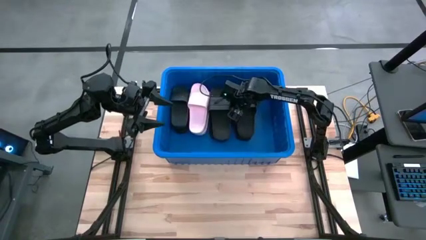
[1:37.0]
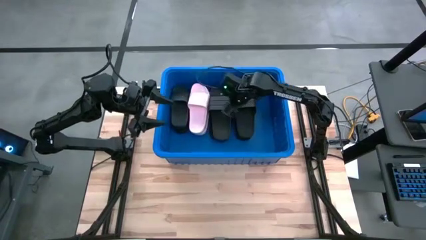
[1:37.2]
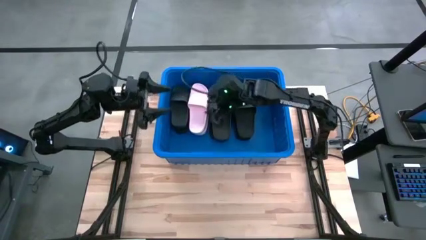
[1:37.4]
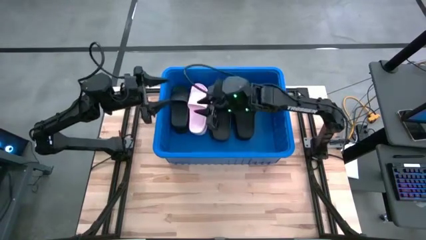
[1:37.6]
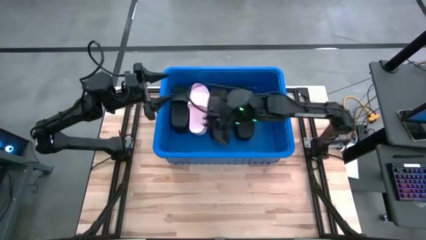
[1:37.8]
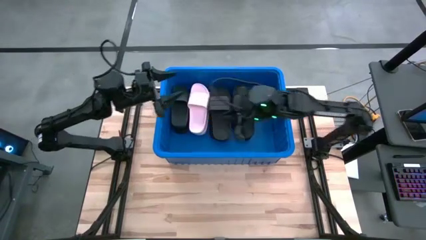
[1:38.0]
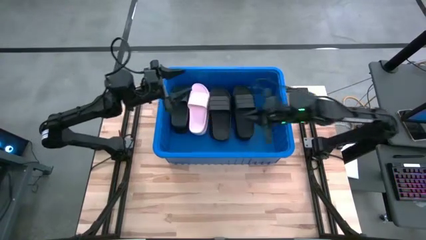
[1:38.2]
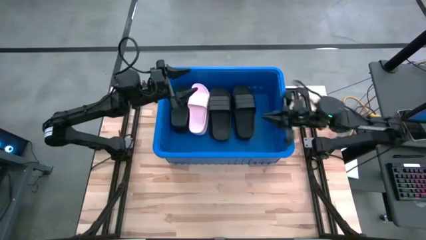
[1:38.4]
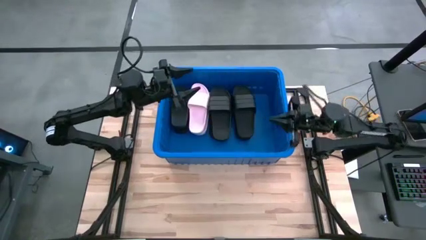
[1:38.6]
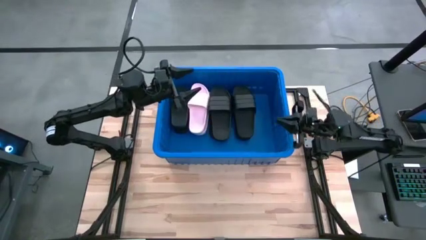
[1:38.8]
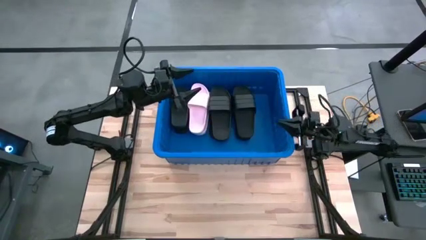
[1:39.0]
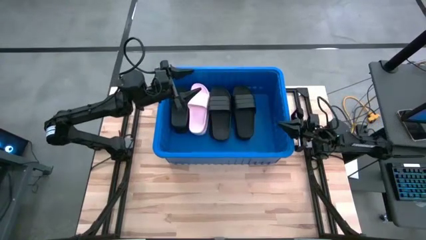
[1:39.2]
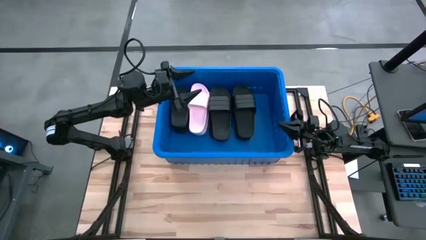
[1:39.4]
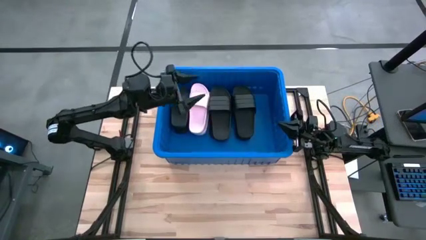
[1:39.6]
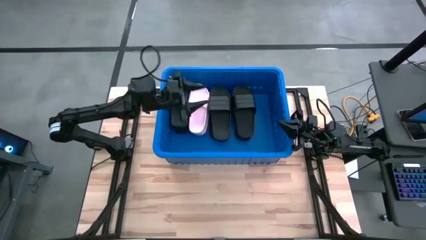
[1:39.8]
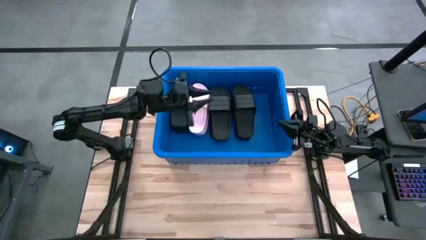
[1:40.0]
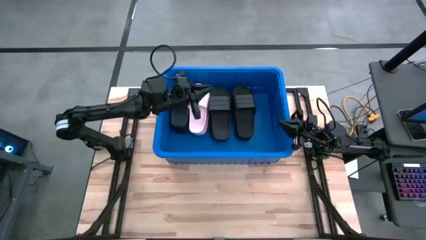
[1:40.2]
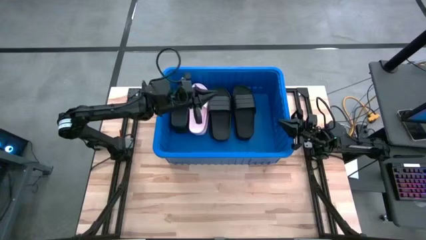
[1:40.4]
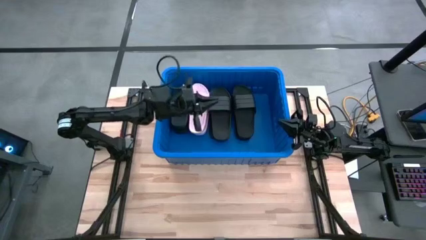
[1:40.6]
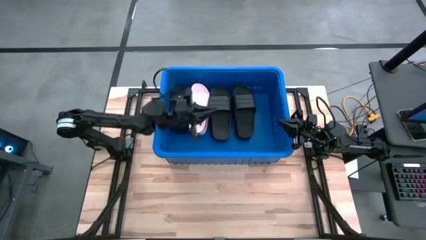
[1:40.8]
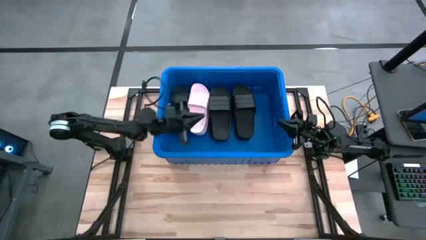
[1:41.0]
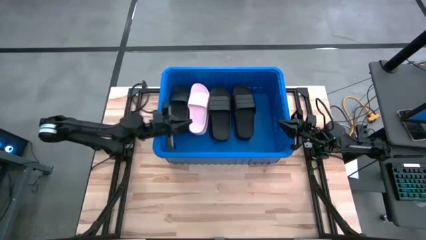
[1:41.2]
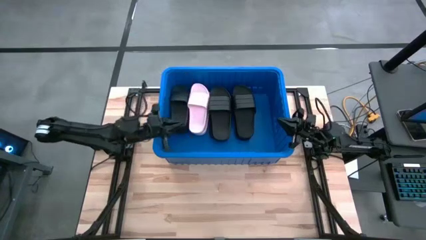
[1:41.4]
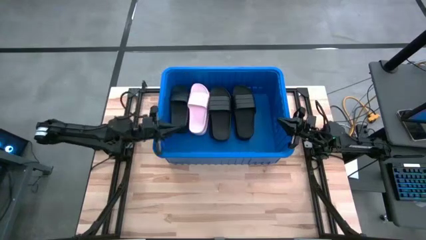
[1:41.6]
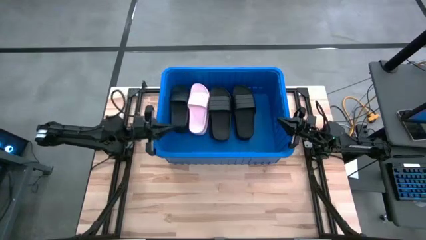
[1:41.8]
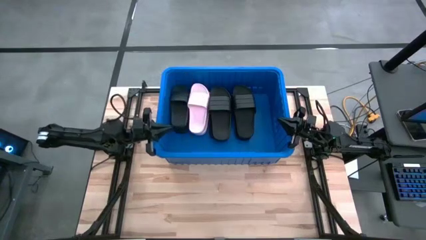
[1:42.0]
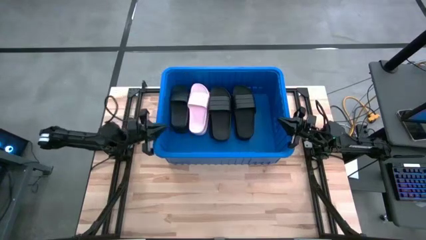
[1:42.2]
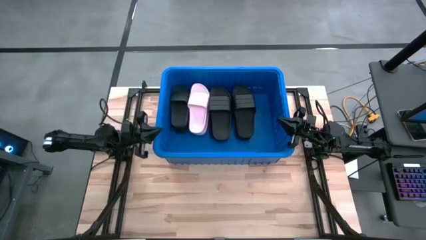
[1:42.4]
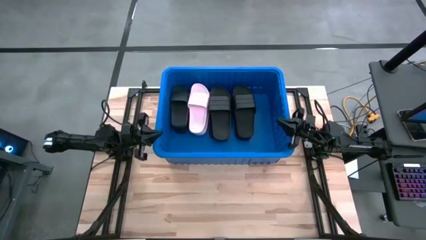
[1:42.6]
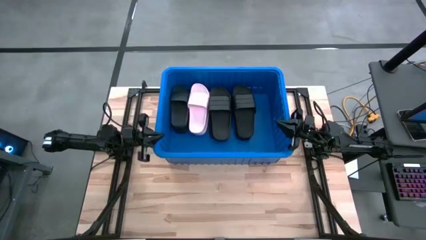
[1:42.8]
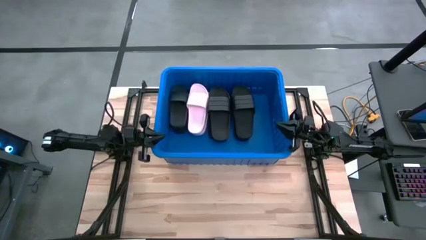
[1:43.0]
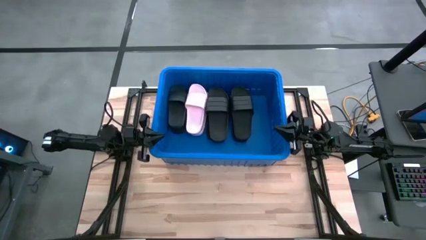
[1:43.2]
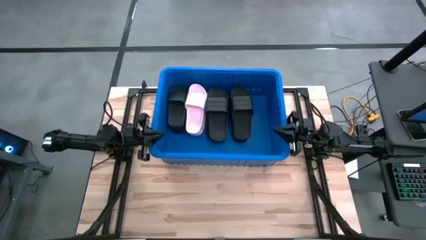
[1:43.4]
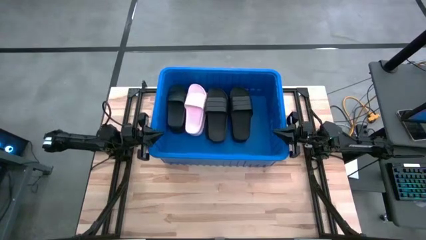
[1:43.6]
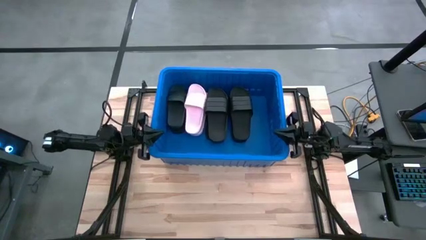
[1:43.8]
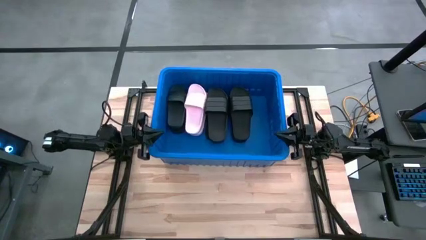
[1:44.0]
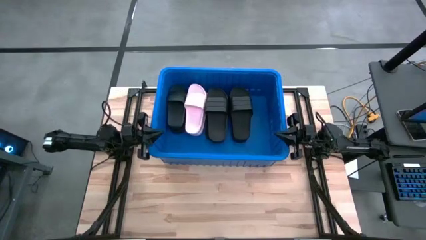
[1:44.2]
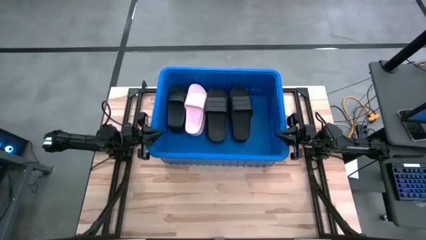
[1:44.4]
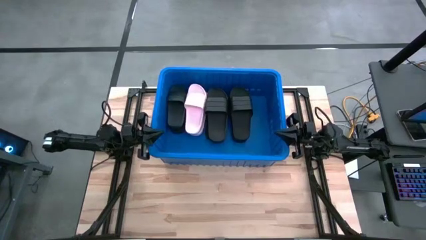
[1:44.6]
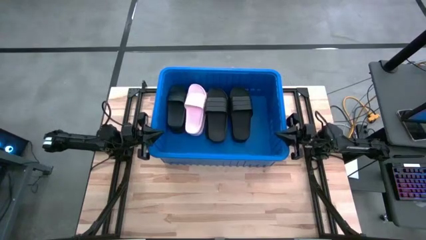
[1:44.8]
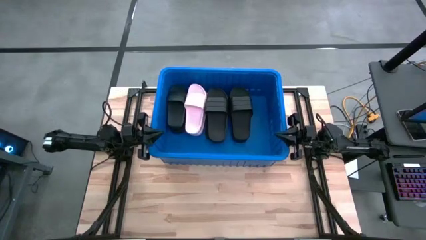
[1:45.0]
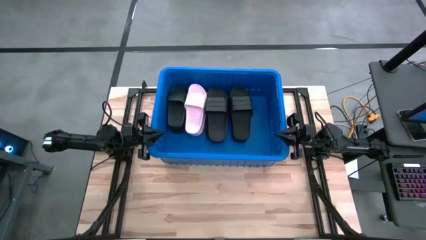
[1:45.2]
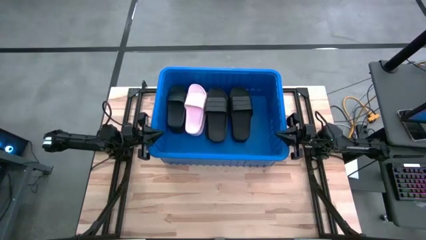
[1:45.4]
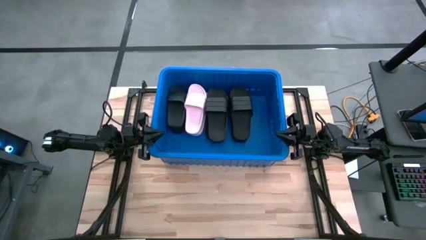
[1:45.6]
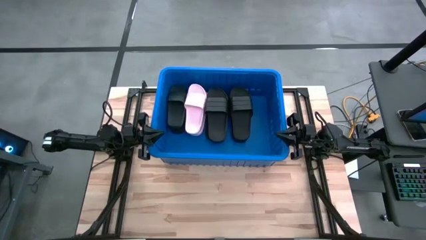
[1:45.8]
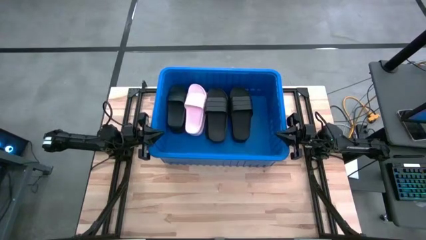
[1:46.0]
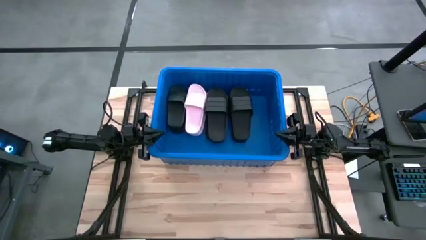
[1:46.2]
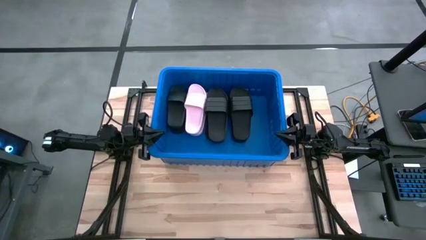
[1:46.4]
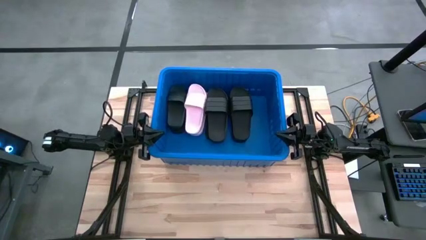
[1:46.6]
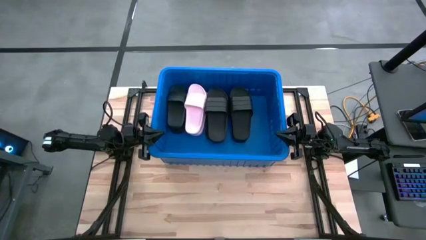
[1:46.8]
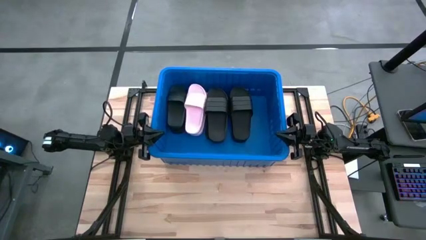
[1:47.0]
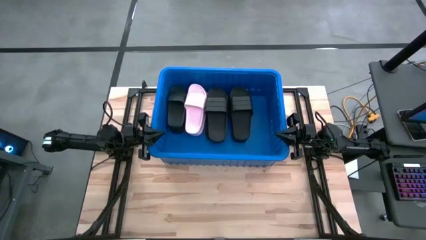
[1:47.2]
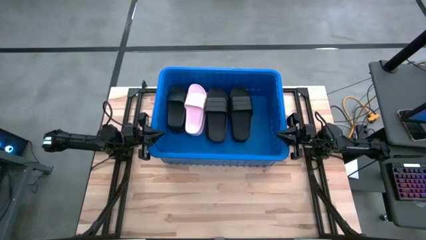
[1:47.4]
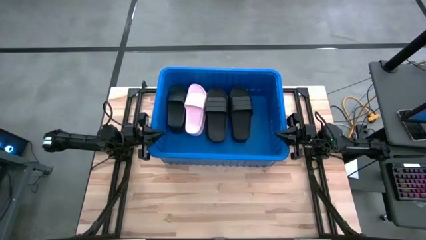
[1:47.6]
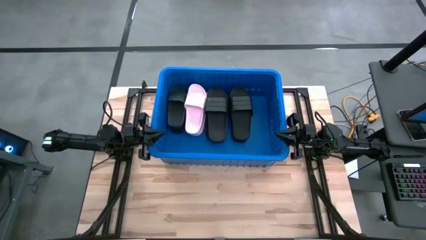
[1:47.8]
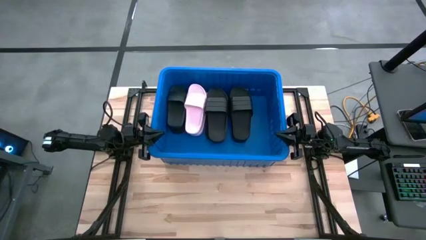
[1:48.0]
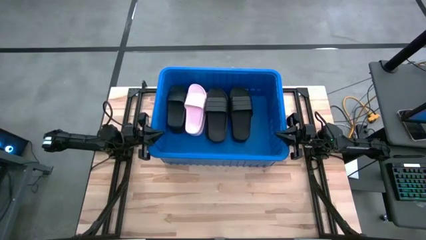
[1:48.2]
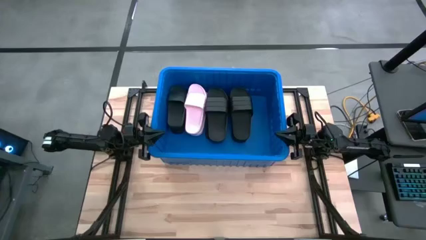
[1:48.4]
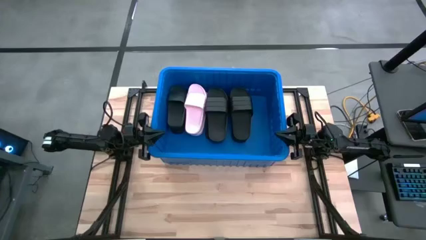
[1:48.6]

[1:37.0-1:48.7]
Task: Pick and place slides into bin
Return to Home Position
